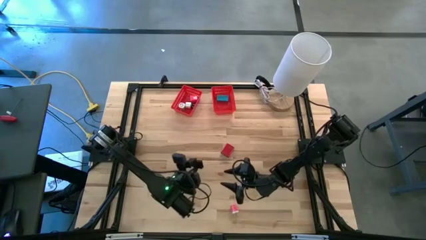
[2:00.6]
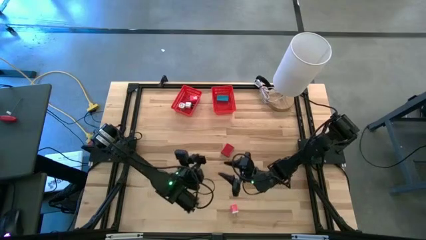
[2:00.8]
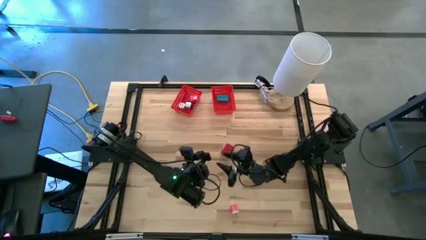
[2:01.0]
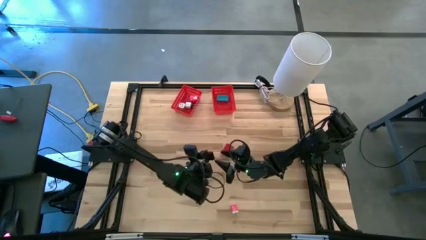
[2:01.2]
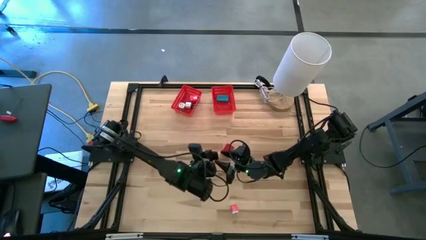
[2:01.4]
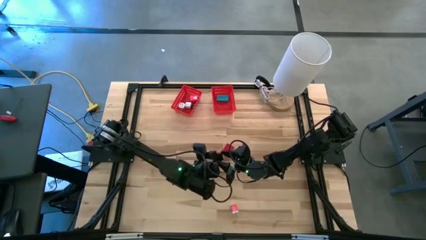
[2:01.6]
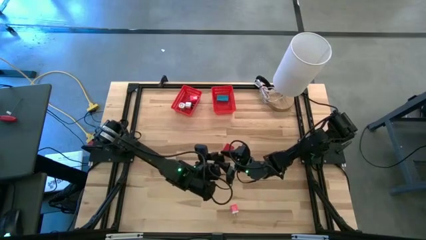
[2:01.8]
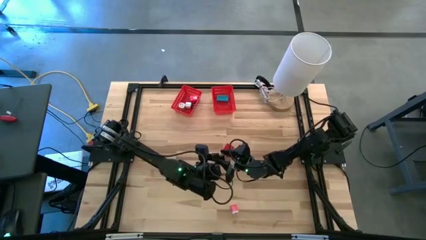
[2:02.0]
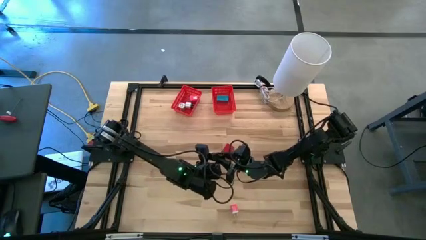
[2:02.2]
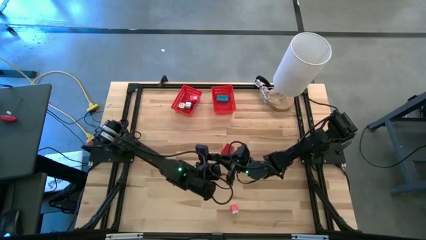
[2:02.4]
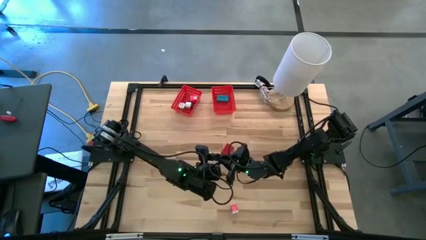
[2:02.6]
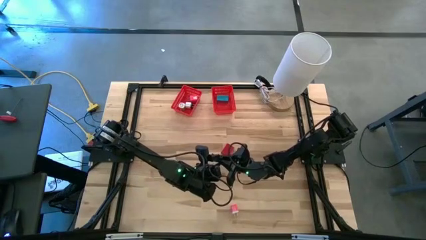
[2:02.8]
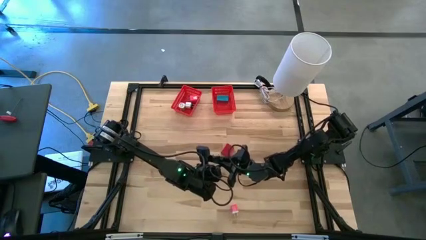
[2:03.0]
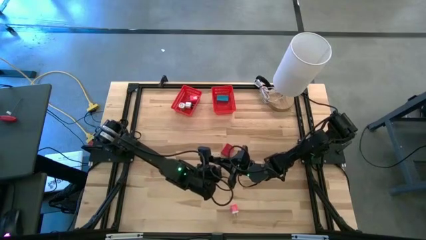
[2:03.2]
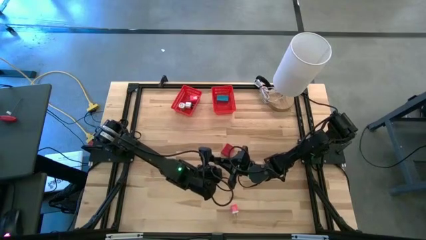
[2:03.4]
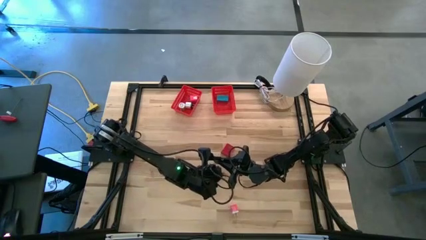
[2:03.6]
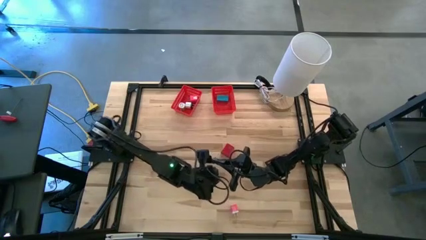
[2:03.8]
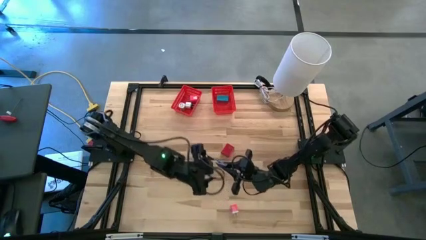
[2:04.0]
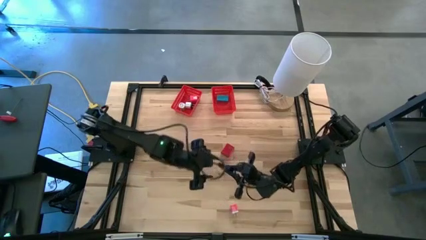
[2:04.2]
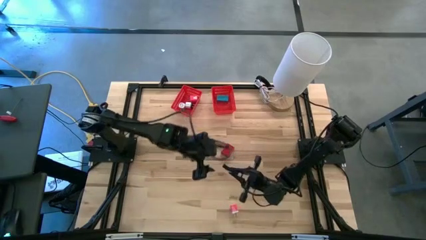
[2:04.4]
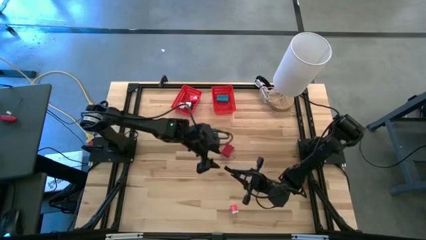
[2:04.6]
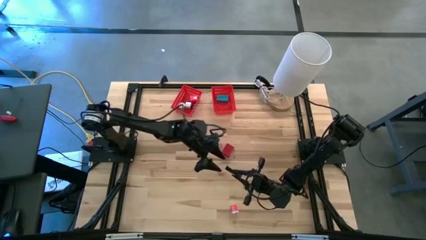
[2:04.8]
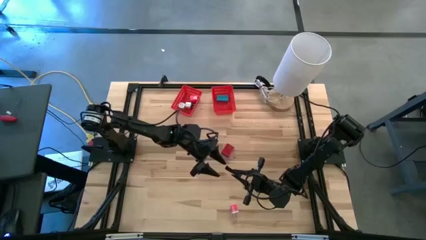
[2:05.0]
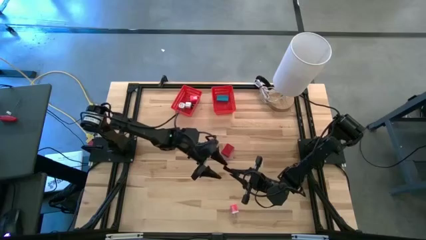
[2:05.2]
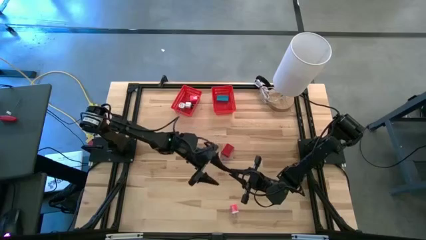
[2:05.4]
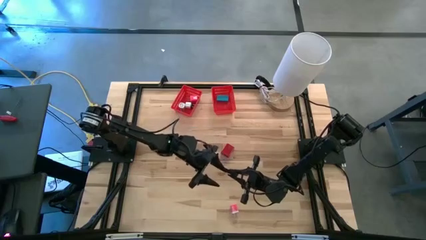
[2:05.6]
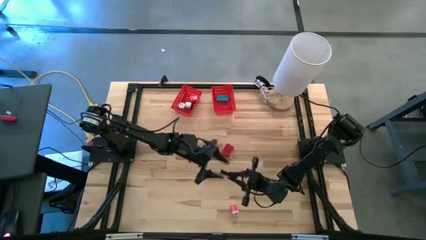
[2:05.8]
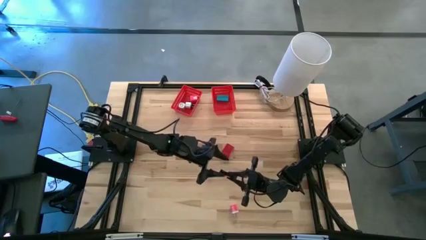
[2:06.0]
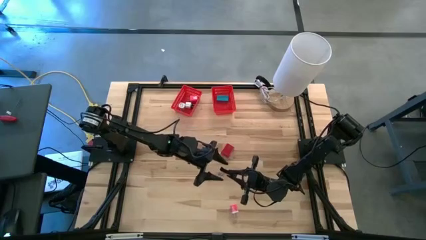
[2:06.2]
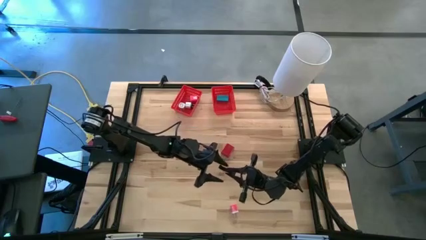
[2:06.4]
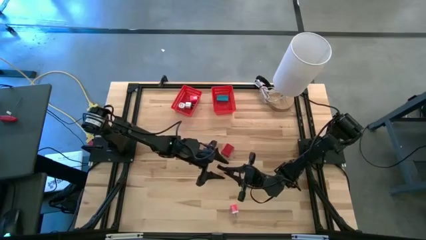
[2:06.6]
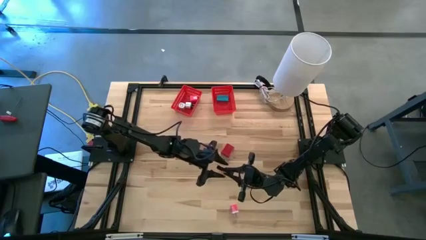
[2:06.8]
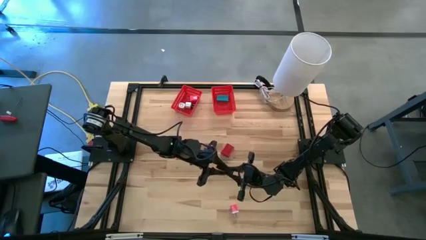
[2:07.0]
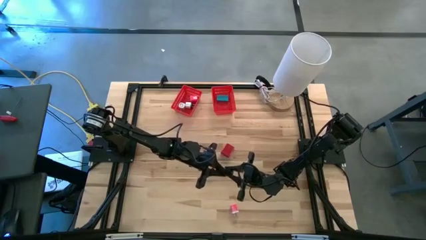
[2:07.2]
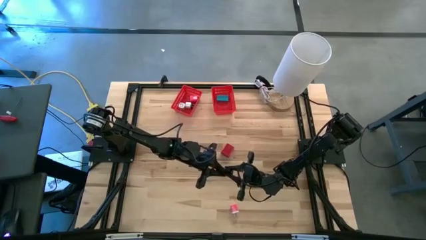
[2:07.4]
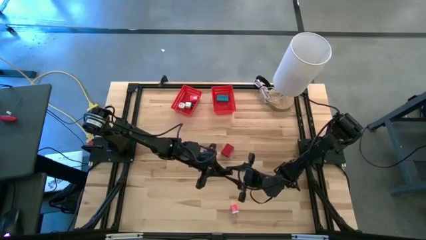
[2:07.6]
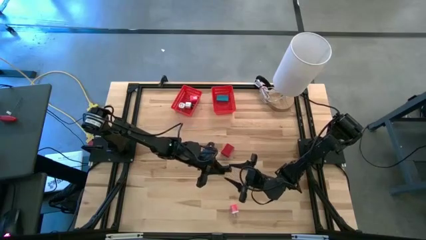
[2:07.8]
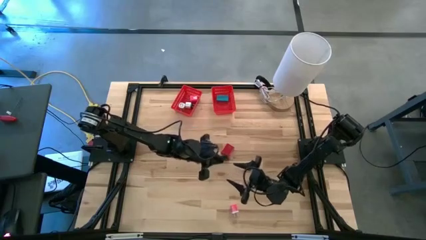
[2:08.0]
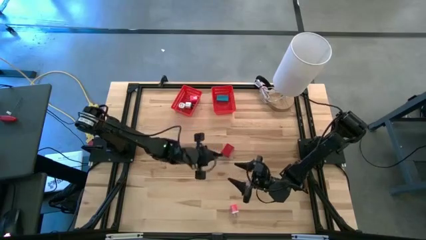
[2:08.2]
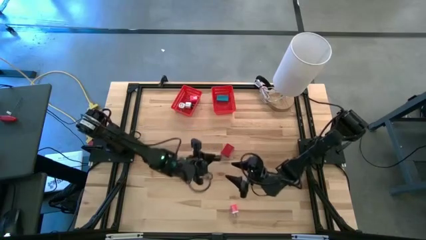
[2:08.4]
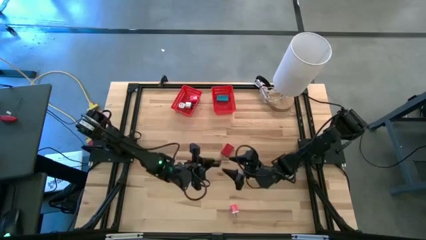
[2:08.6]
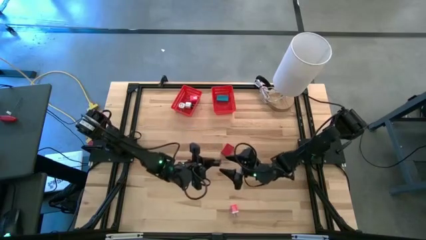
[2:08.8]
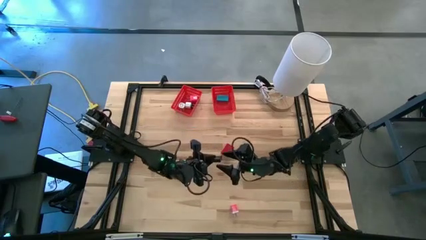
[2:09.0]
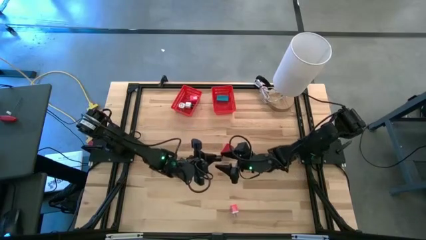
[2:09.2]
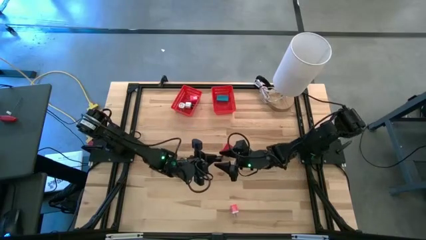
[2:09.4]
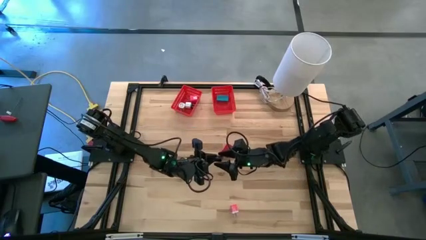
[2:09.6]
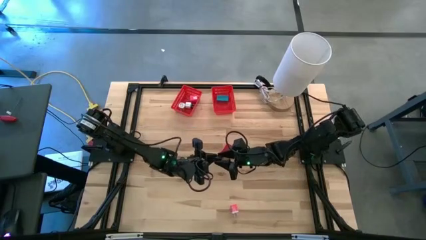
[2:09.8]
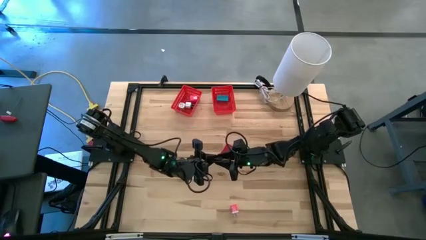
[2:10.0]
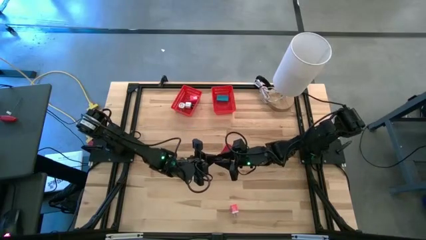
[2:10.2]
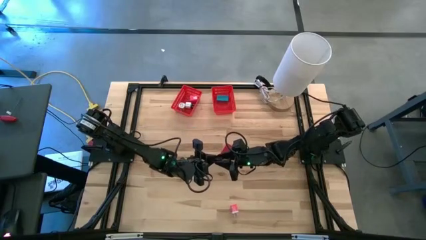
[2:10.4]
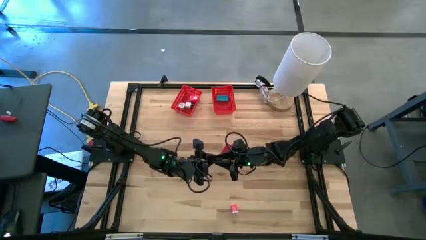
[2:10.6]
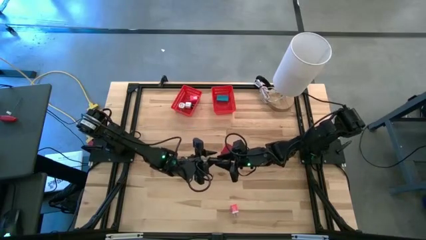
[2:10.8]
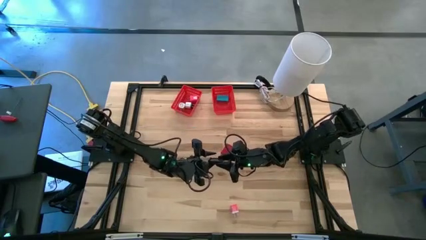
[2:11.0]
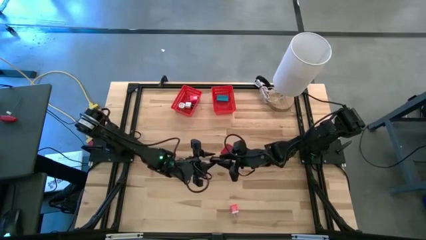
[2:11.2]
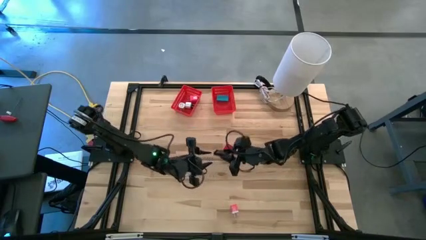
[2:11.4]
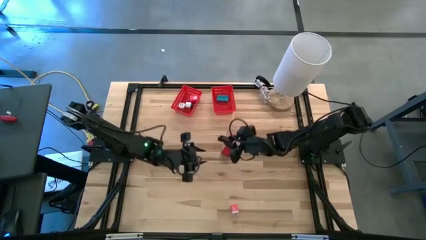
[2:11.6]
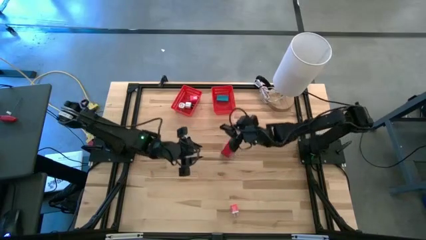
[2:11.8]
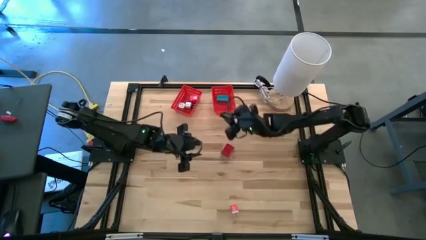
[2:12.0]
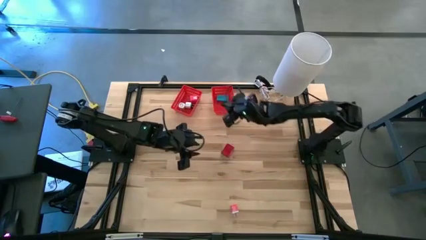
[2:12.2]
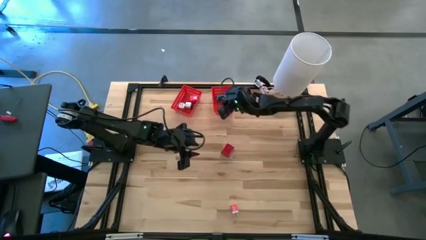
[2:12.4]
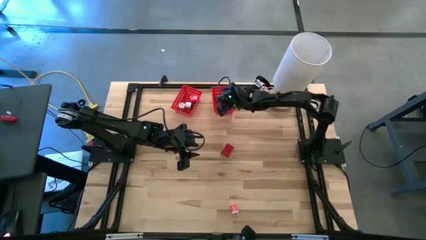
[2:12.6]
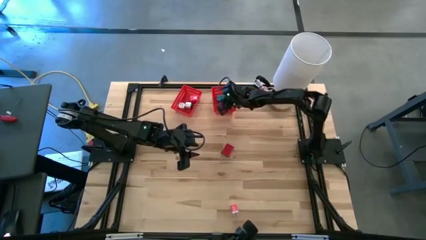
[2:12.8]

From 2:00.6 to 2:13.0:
Task: Pick & Place Office items
Put the black digital clock into the right red bin
